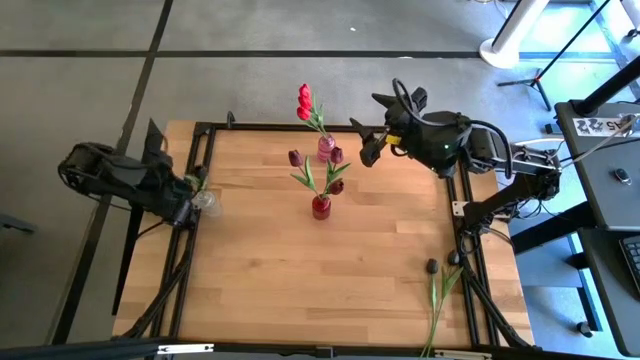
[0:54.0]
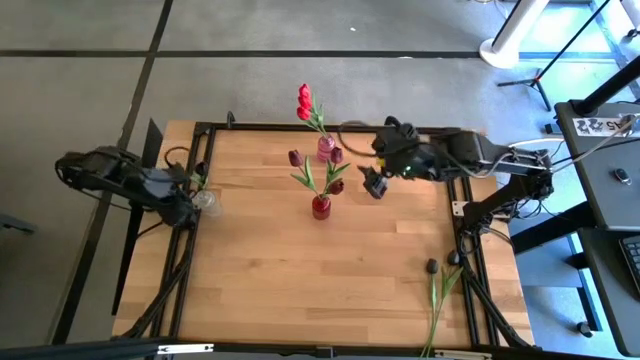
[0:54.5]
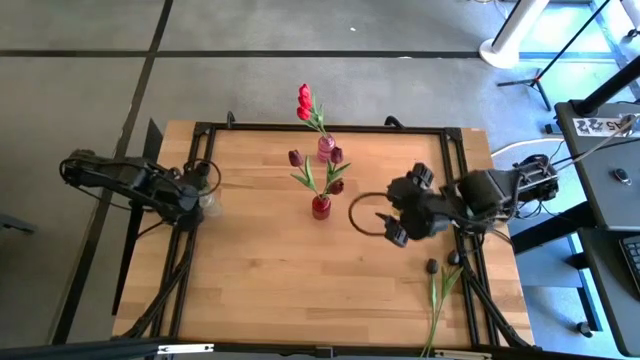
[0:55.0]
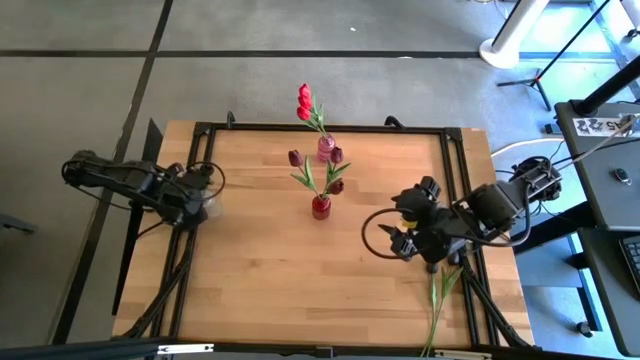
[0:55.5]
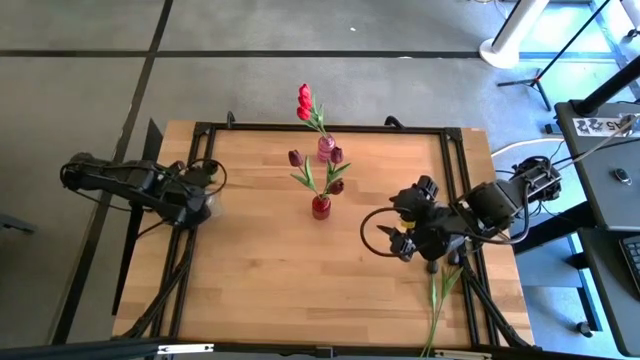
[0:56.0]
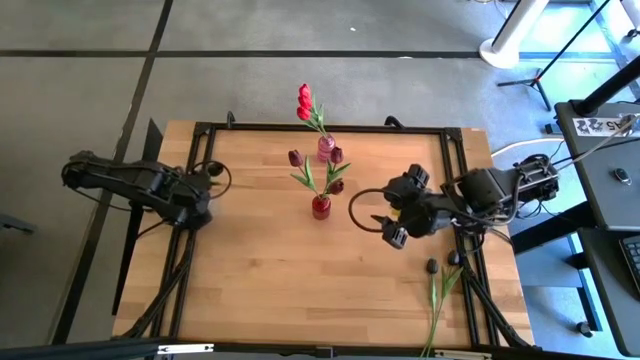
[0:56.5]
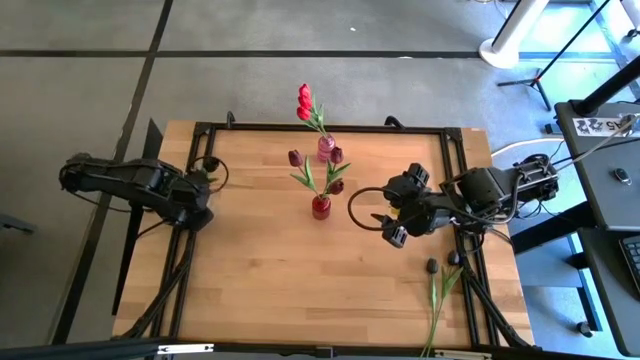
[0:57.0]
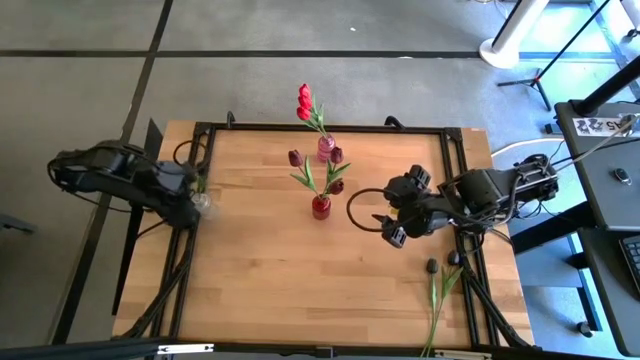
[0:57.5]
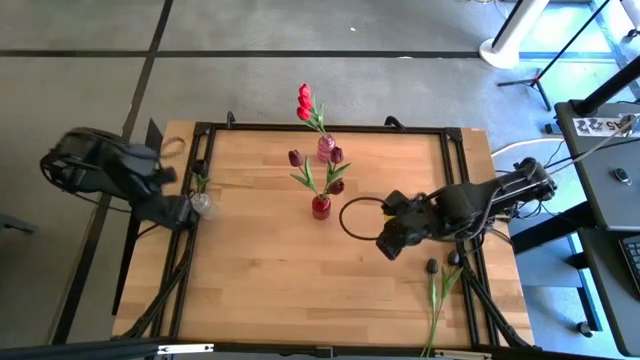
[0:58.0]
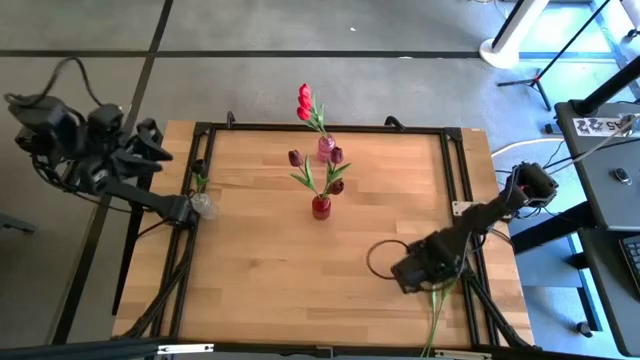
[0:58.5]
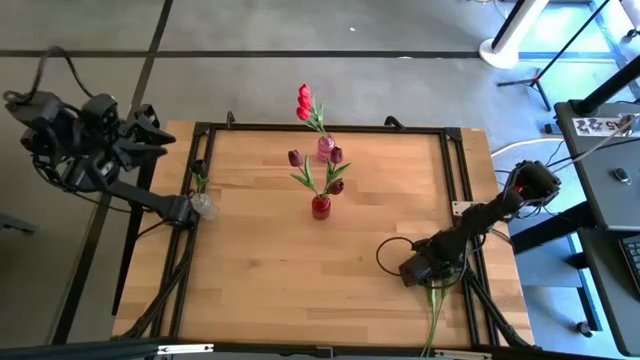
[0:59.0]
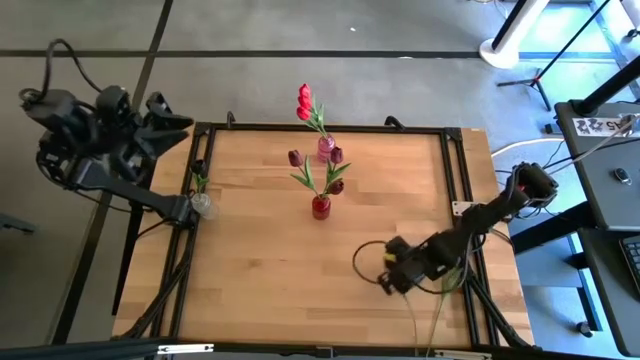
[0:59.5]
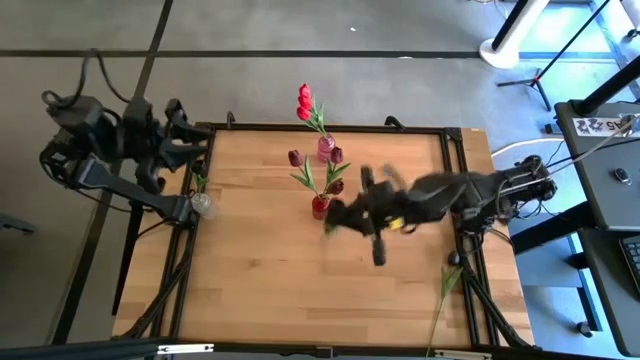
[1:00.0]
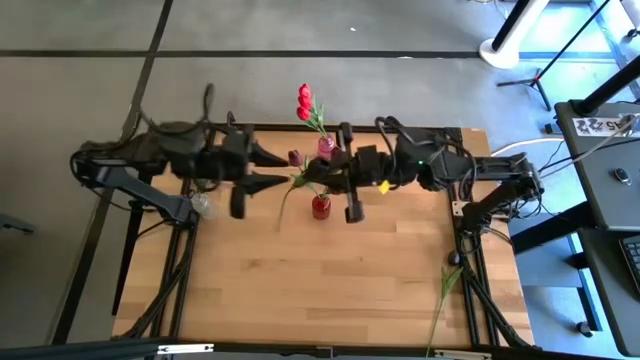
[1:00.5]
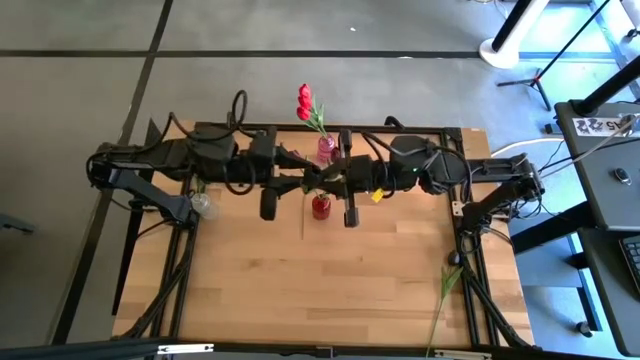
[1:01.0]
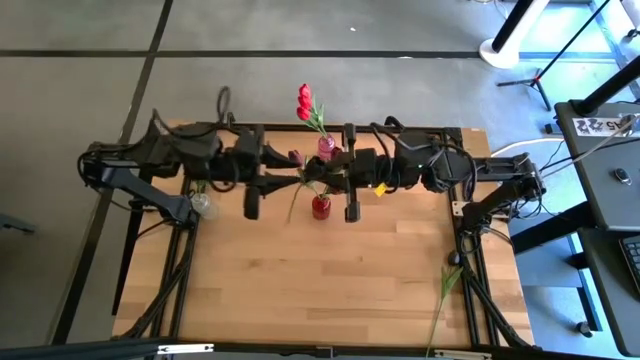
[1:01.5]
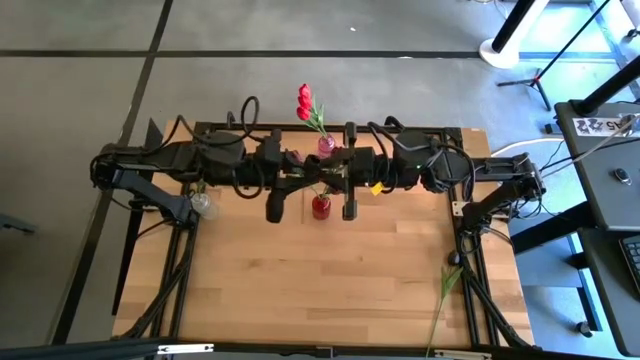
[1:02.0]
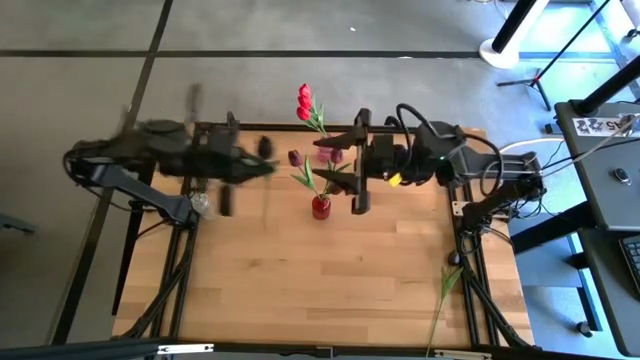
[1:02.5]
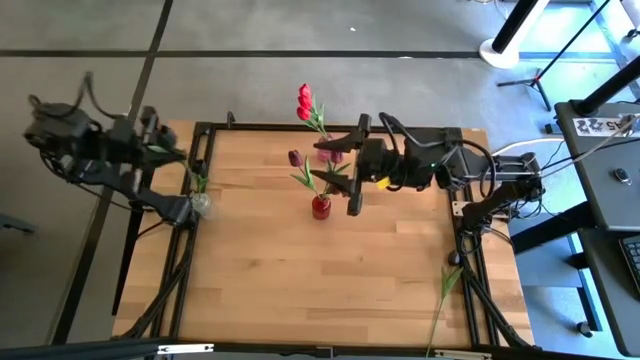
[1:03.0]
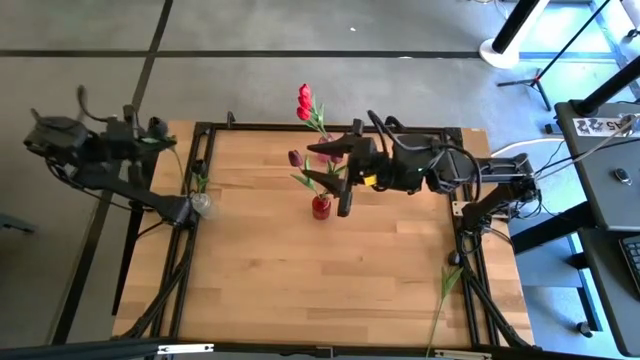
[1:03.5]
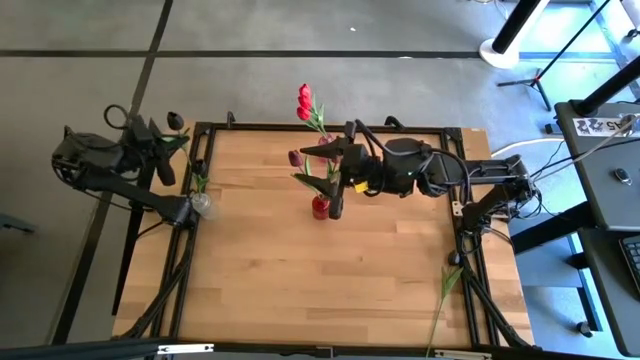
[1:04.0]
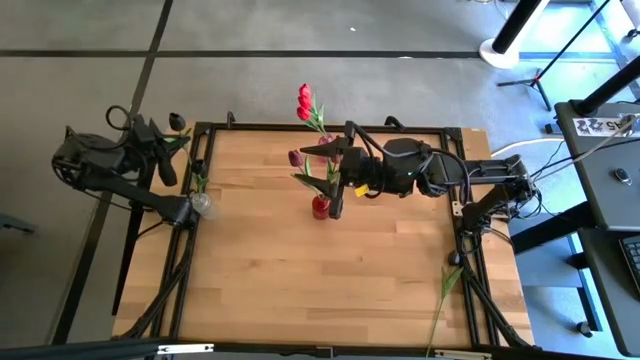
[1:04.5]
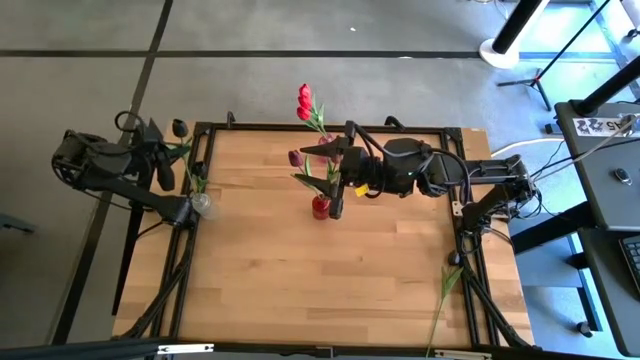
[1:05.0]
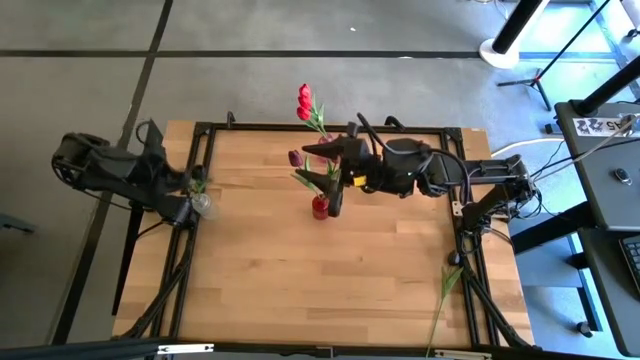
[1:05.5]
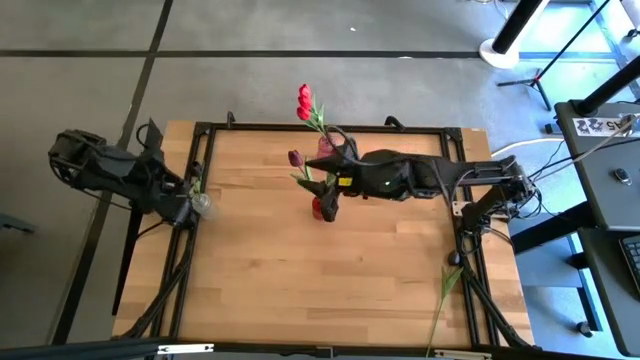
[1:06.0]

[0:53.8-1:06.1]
Task: Sort flowers into vase by color
Put the left black flower into the transparent vase

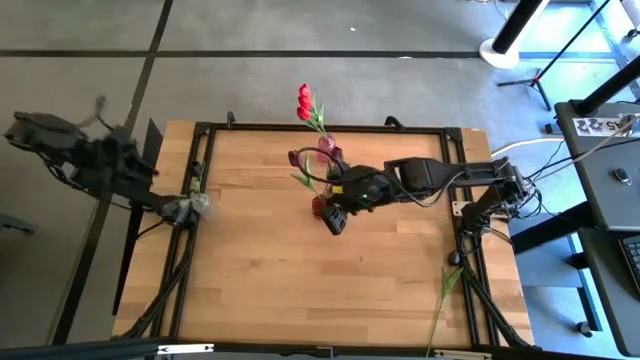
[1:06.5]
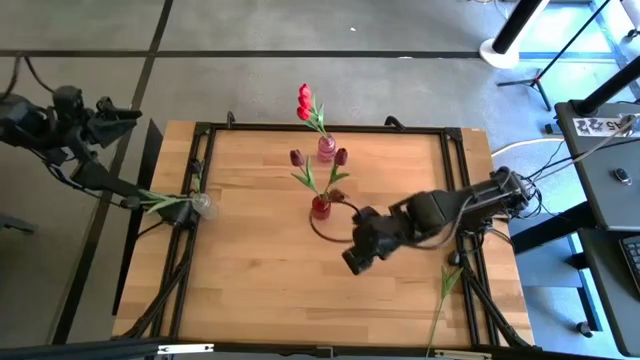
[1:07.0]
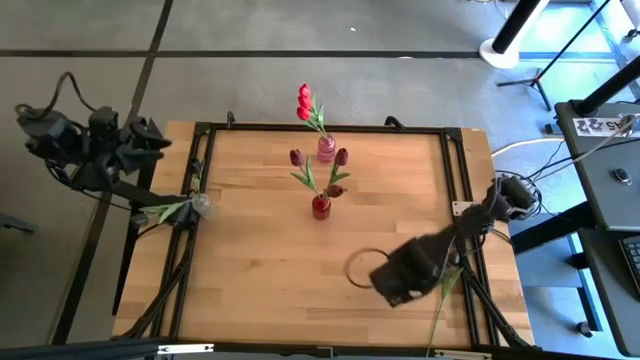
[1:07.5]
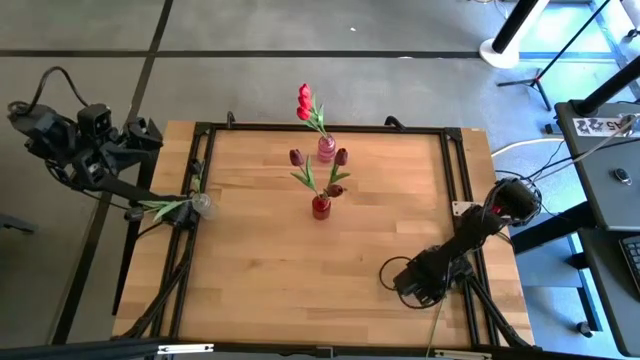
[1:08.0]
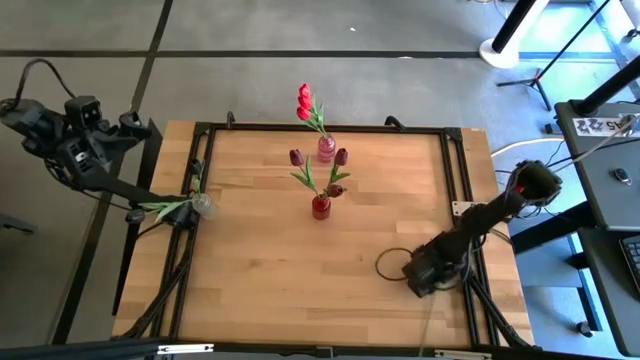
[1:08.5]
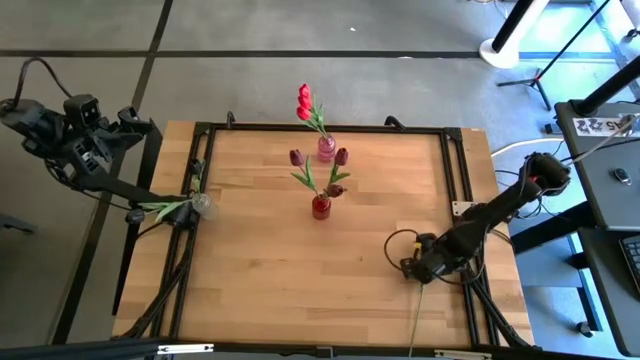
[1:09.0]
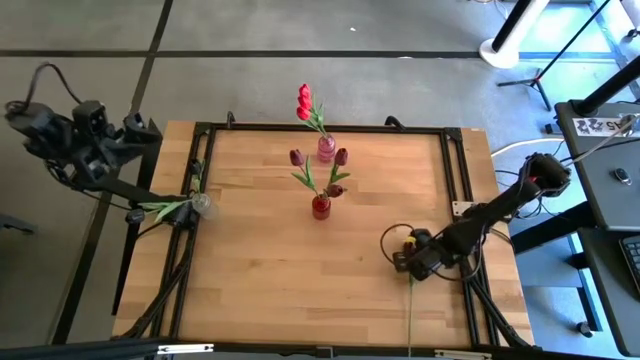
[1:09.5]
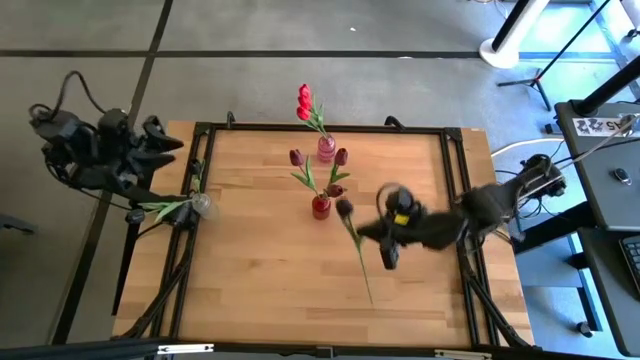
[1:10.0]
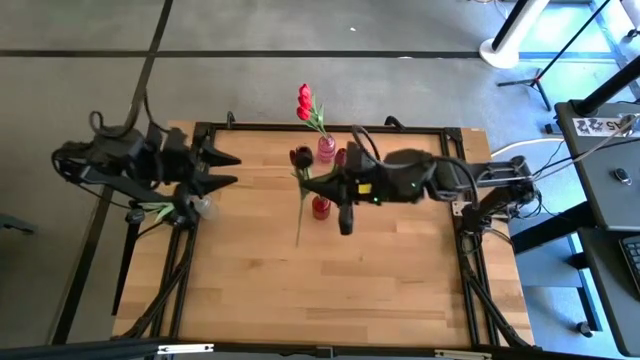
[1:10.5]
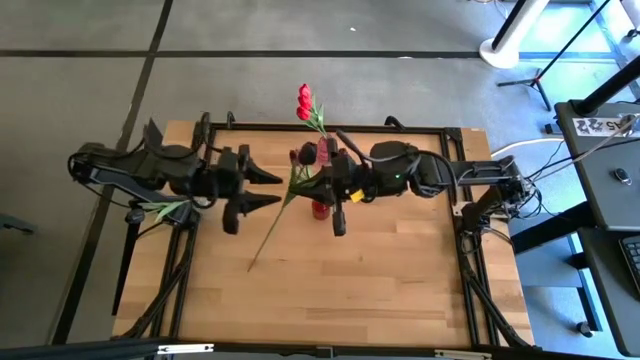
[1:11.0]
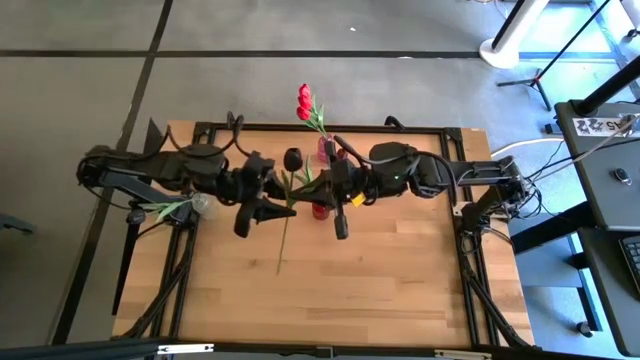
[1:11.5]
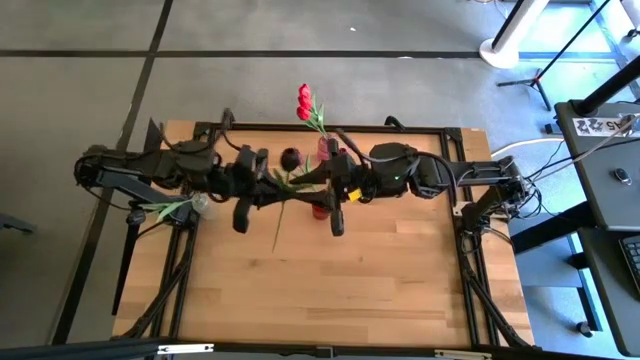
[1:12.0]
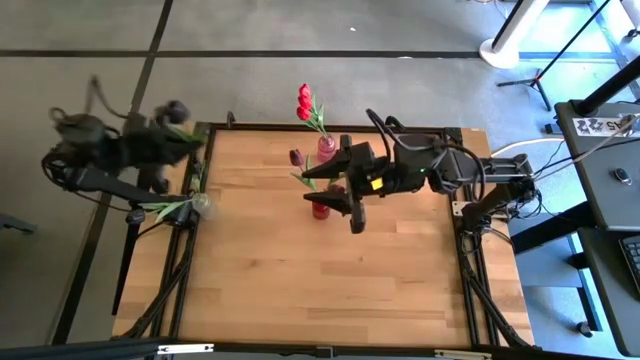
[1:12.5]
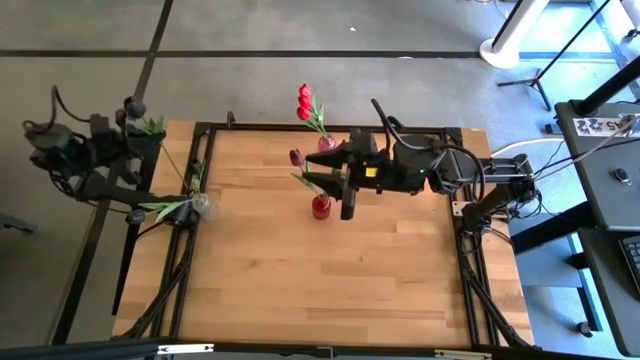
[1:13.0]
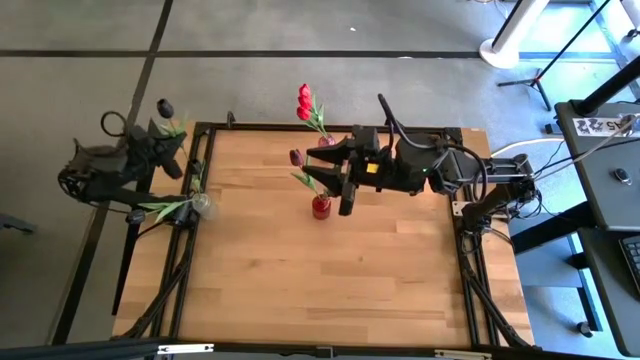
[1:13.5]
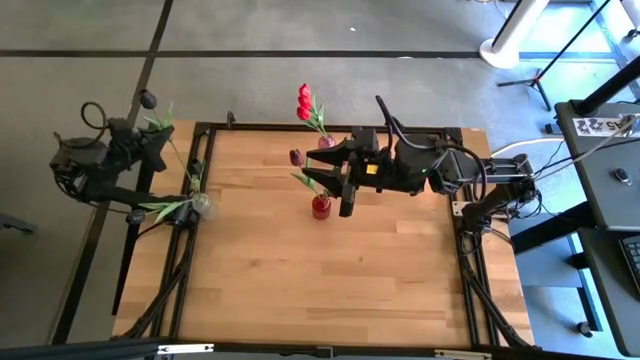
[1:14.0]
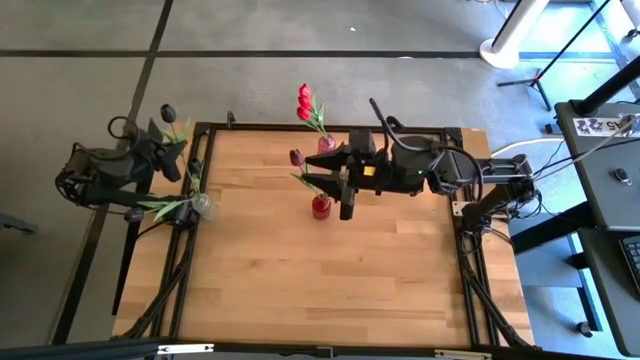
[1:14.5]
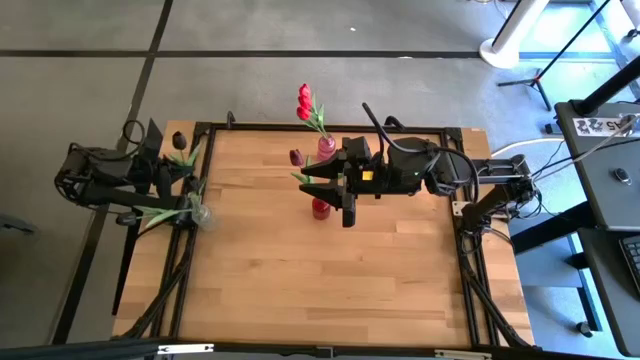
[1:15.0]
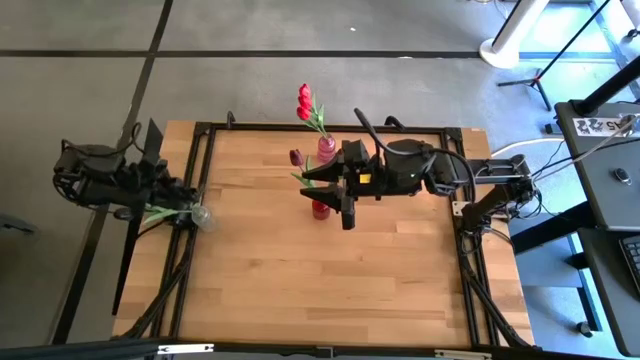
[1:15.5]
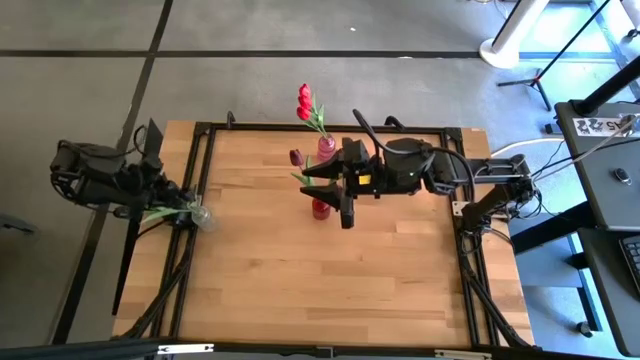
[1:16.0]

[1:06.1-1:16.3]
Put the black flower into the transparent vase
